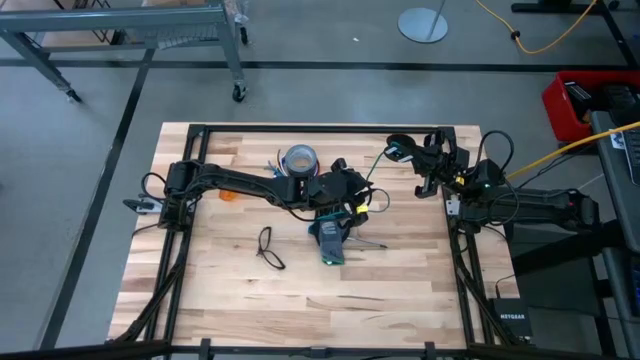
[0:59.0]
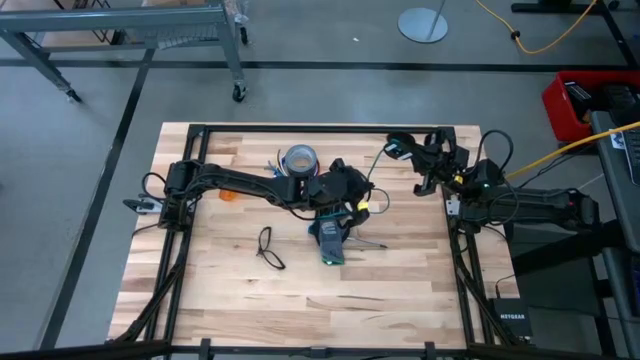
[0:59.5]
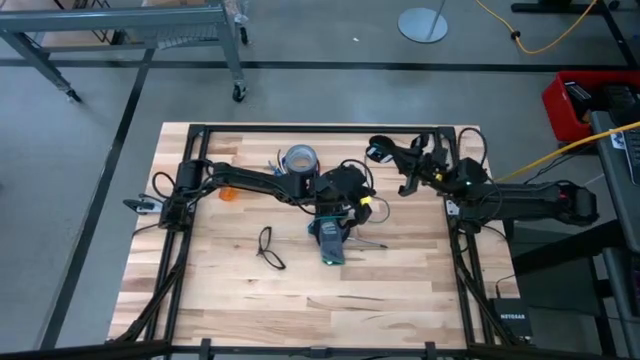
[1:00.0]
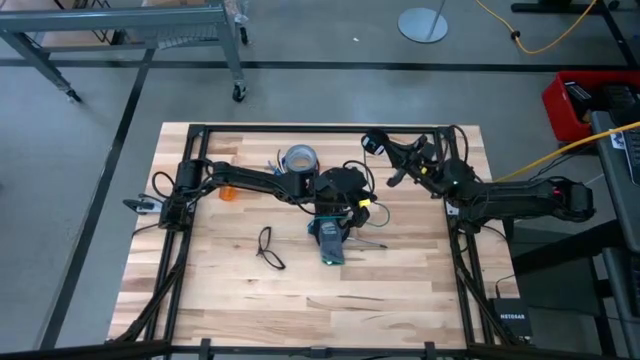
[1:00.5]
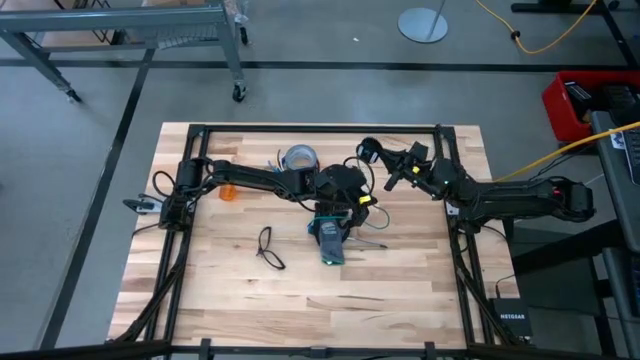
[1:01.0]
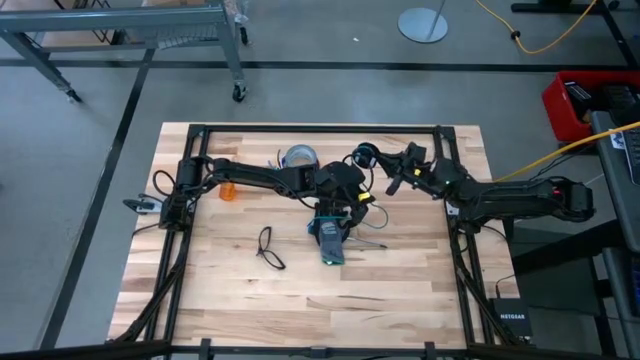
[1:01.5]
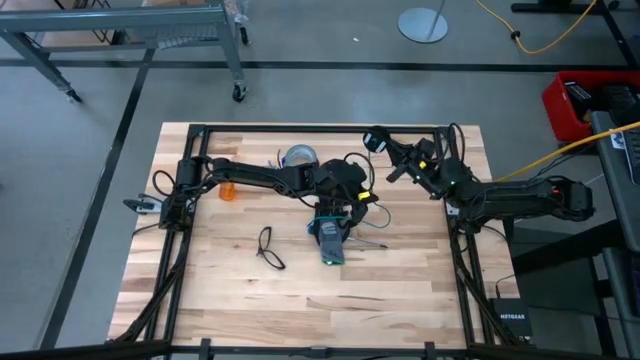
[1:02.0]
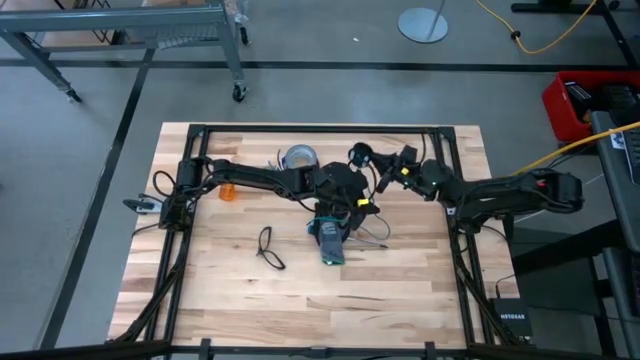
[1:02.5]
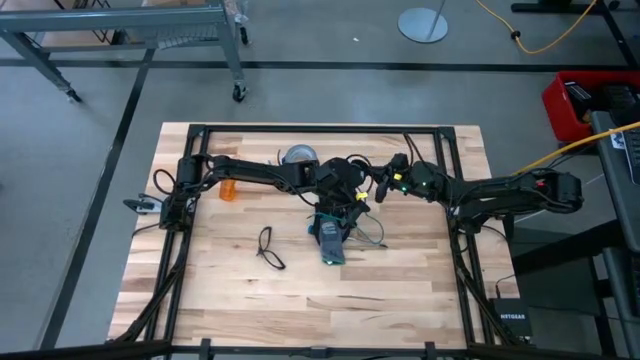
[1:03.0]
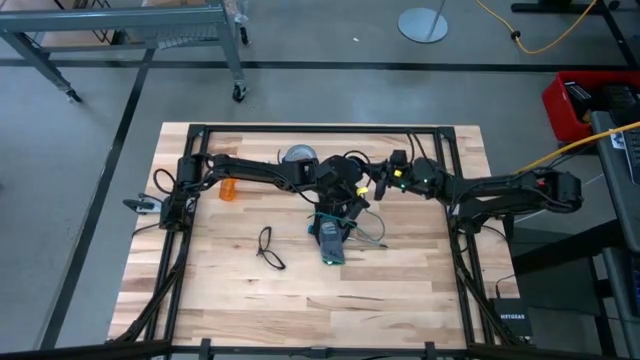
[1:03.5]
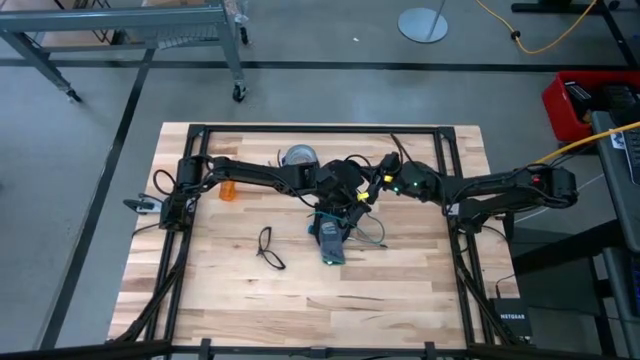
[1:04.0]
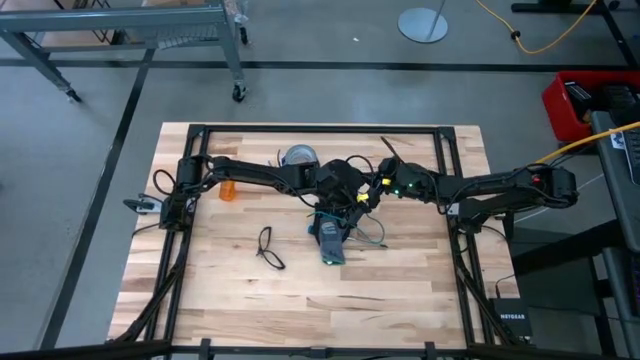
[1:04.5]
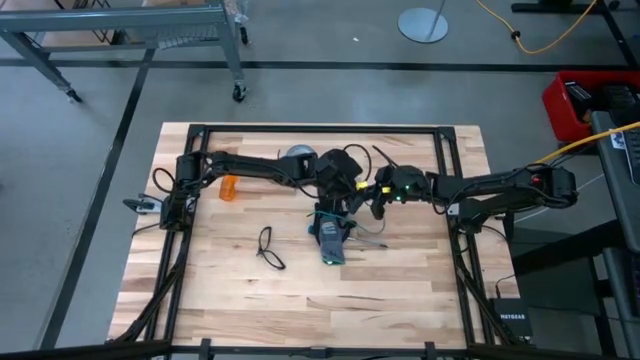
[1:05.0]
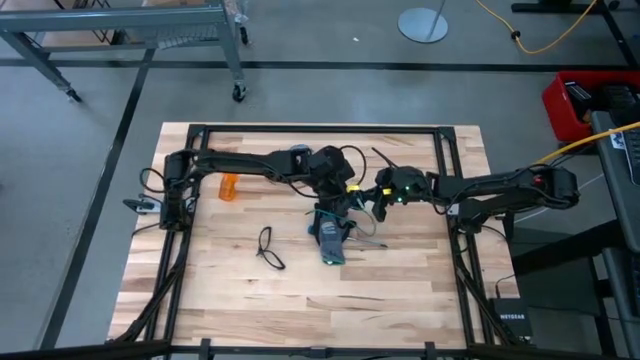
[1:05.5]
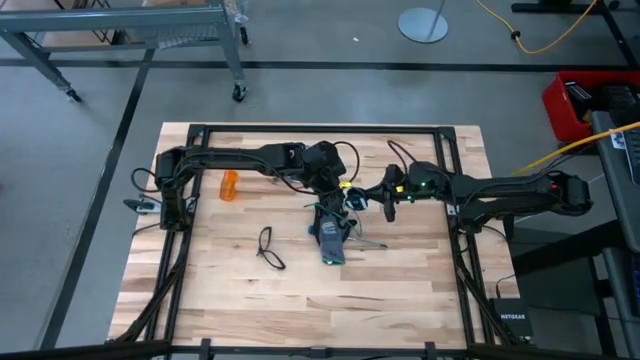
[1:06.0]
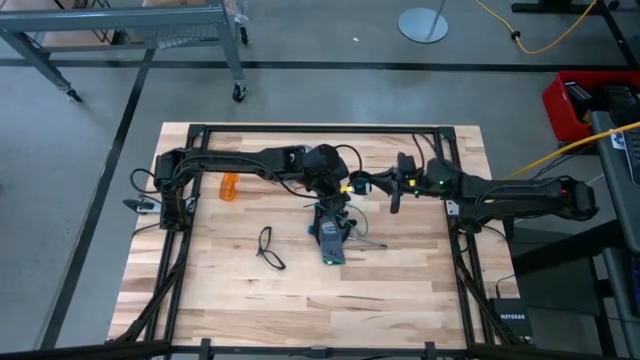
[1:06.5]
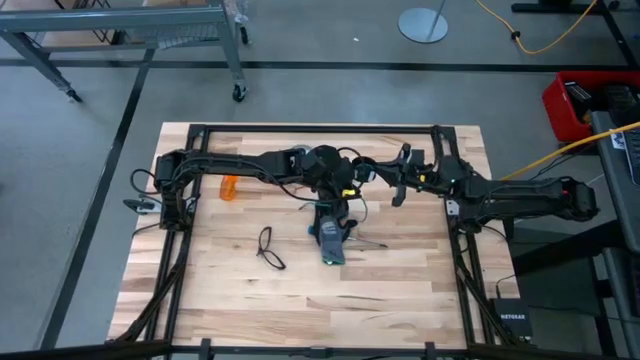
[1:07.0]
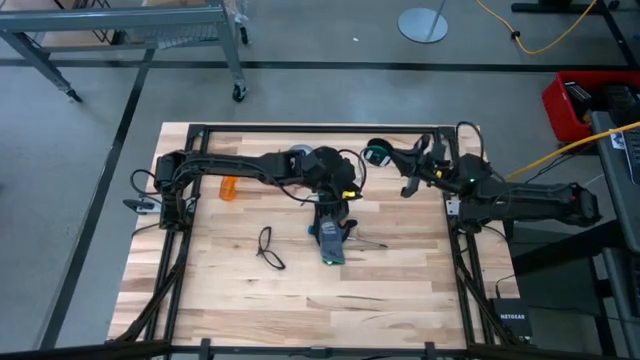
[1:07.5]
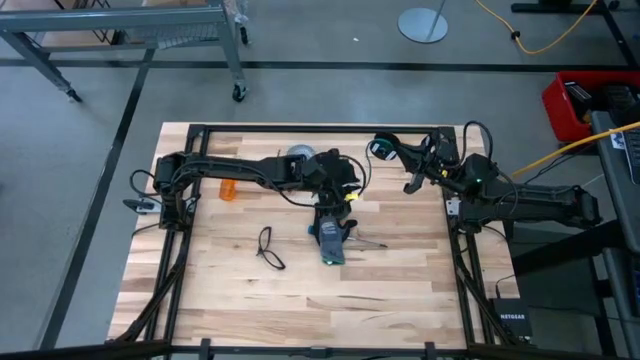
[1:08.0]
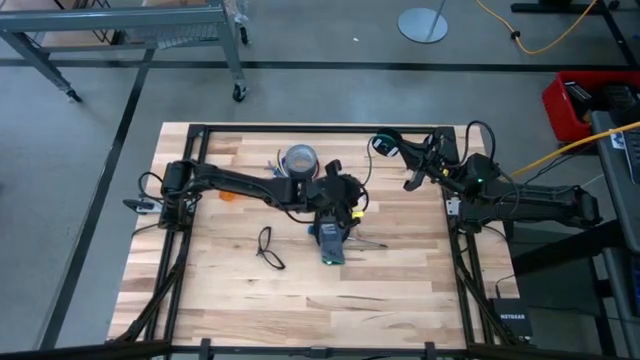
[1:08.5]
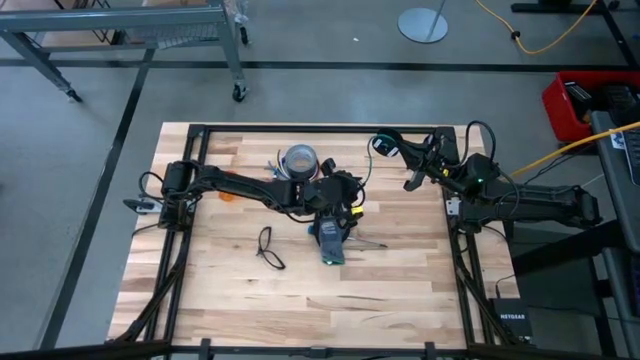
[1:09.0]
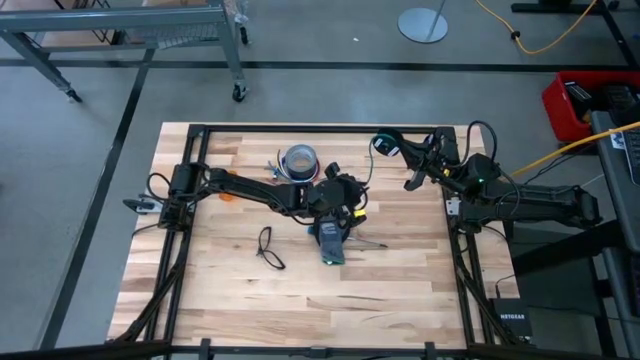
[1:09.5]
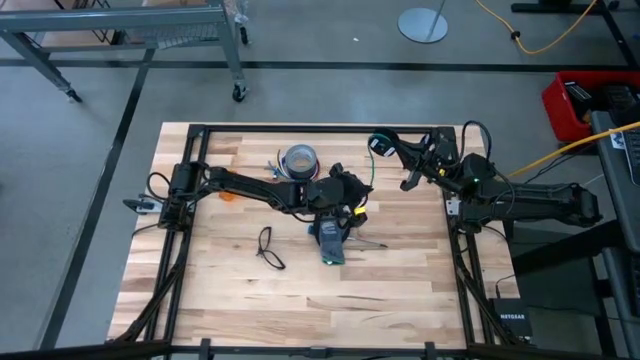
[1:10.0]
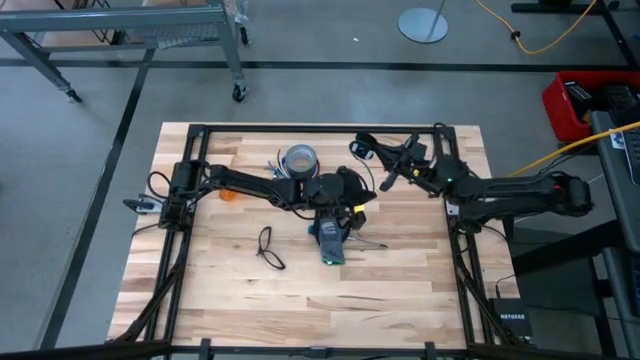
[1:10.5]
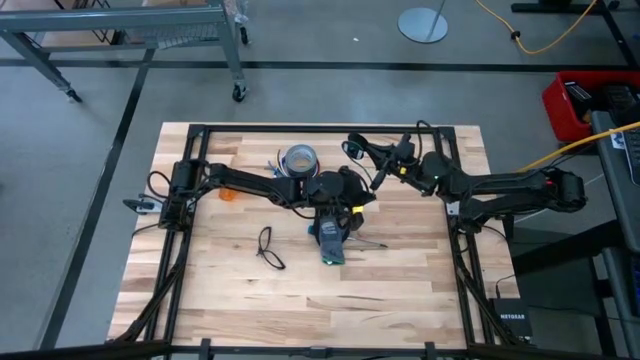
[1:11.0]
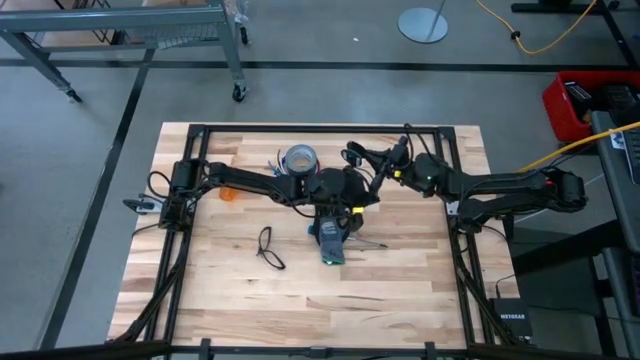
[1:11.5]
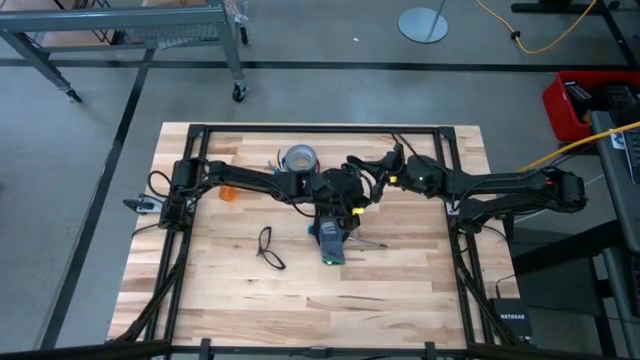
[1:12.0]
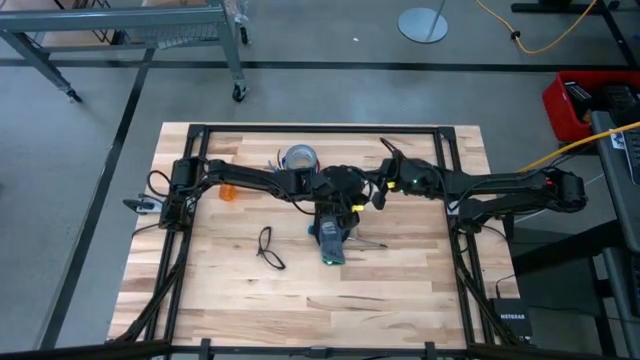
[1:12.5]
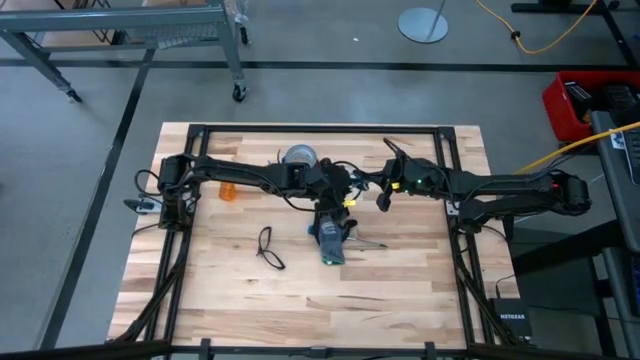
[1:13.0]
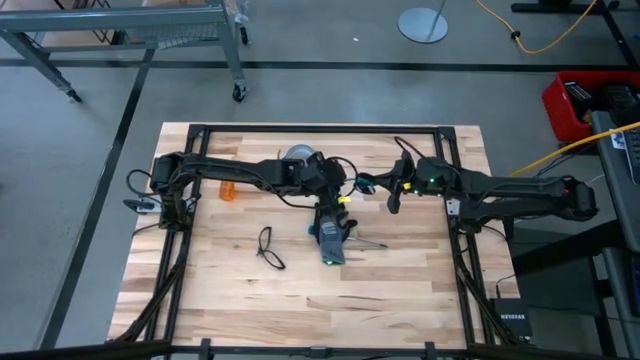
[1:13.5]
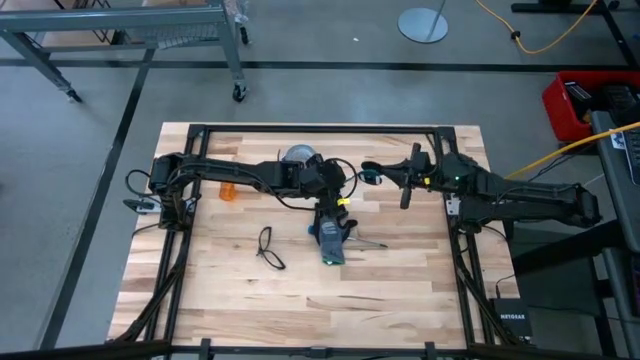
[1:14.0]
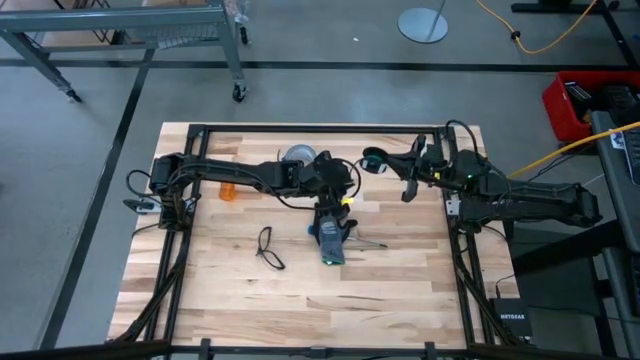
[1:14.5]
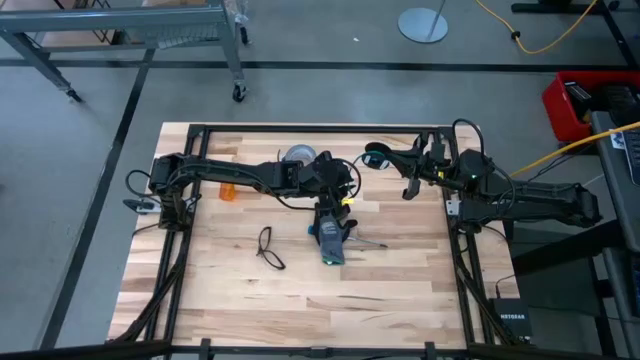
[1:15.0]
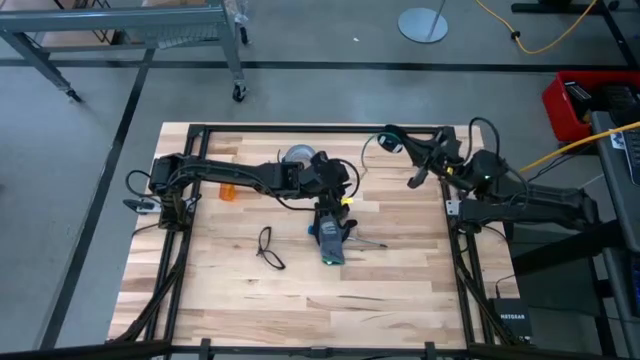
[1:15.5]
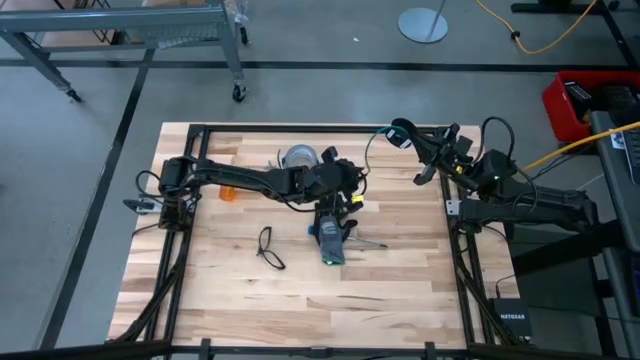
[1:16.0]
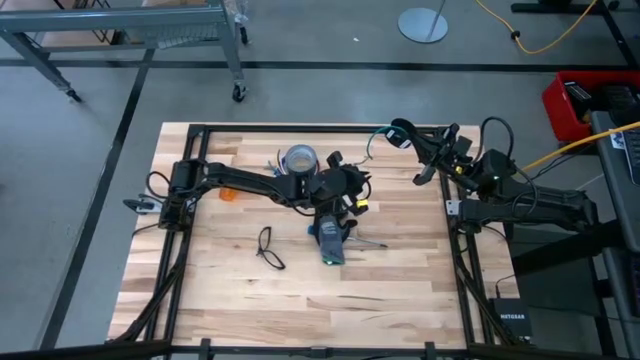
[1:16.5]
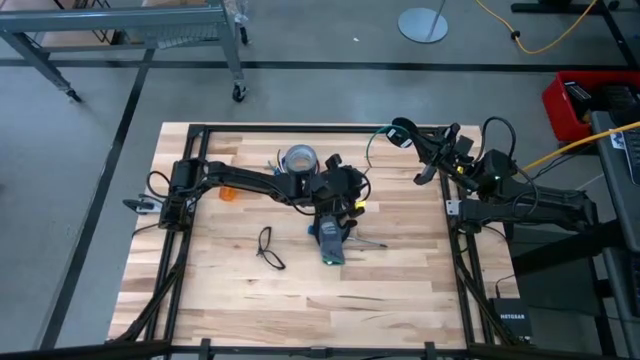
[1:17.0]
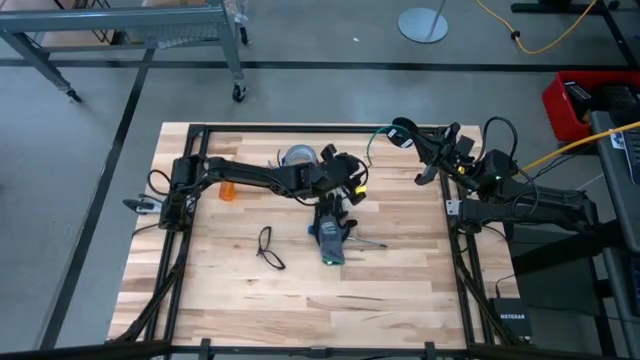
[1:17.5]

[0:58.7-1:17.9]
Task: Coil cords
Coil the green wire on the black spool

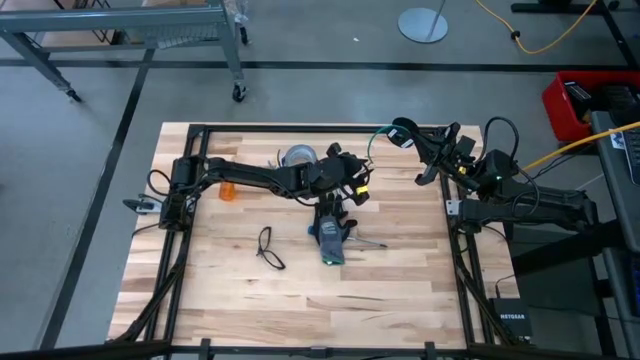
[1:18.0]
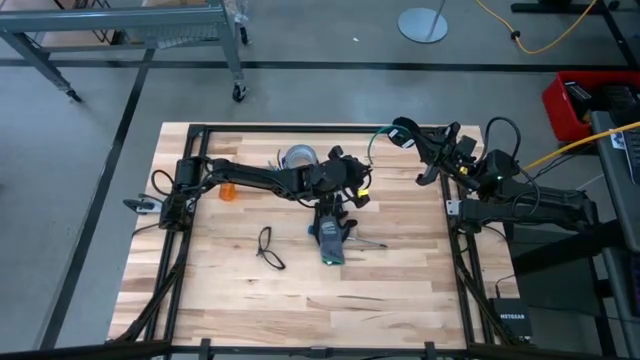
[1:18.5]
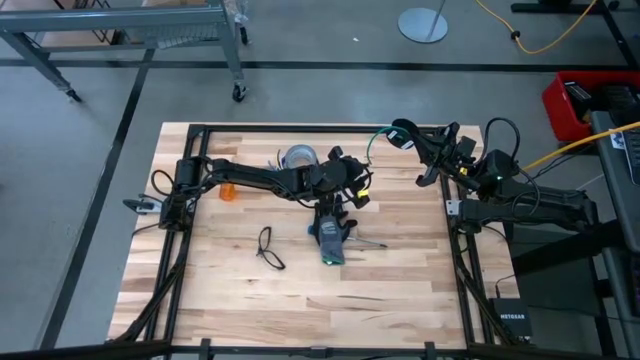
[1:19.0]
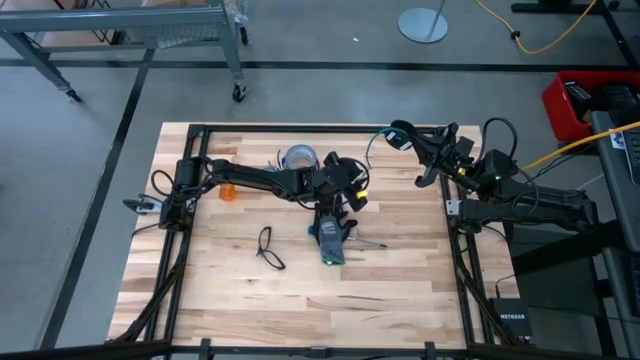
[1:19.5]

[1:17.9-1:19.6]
Coil the green wire on the black spool
